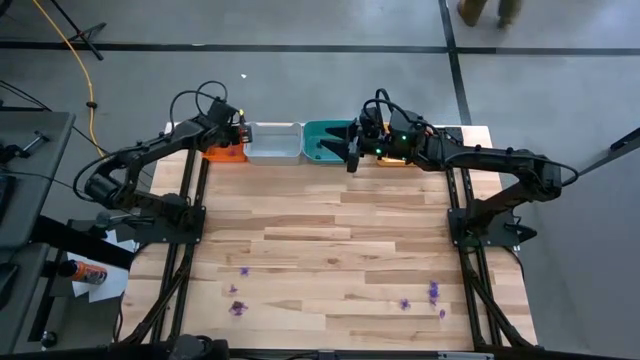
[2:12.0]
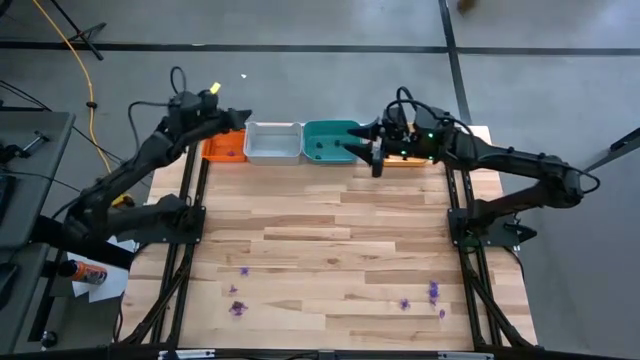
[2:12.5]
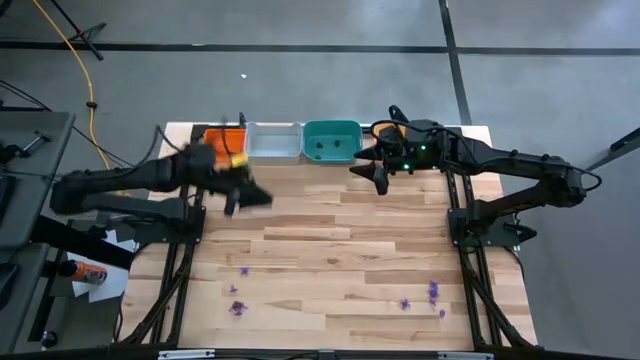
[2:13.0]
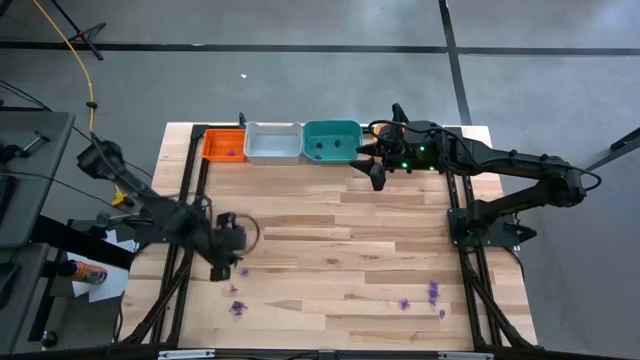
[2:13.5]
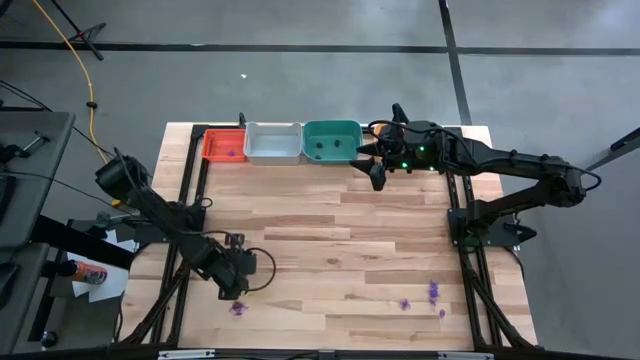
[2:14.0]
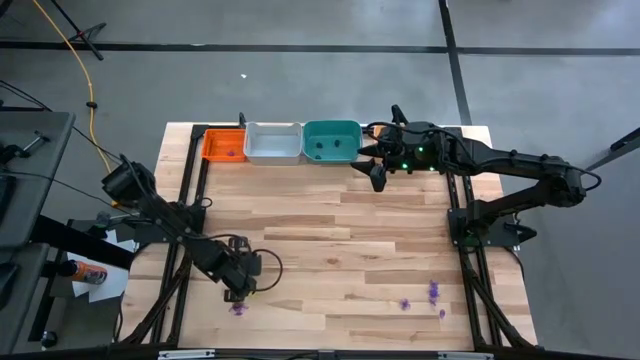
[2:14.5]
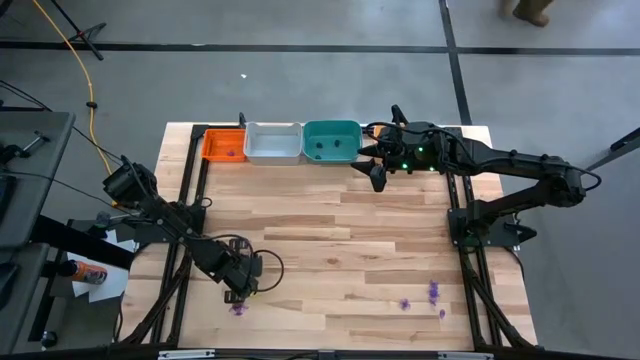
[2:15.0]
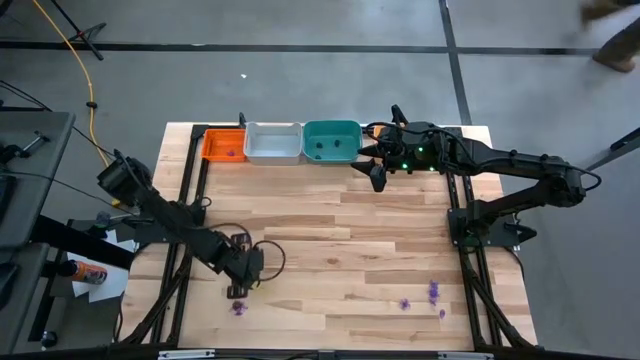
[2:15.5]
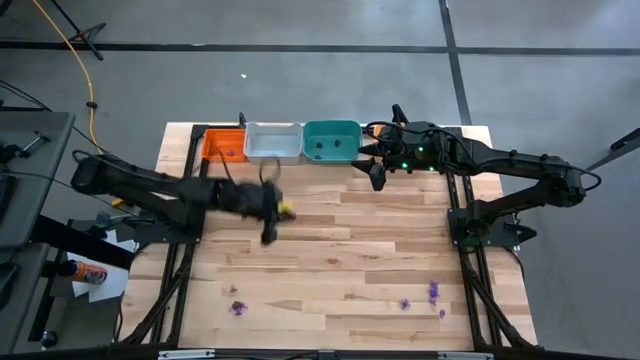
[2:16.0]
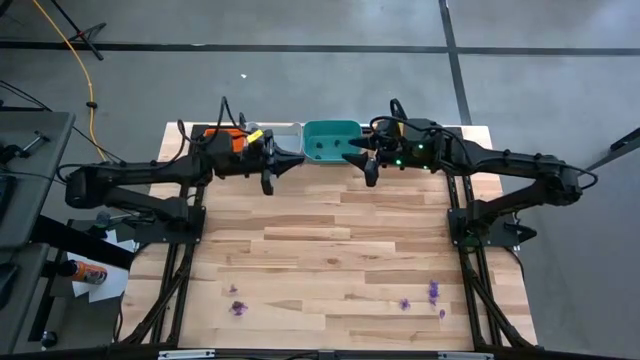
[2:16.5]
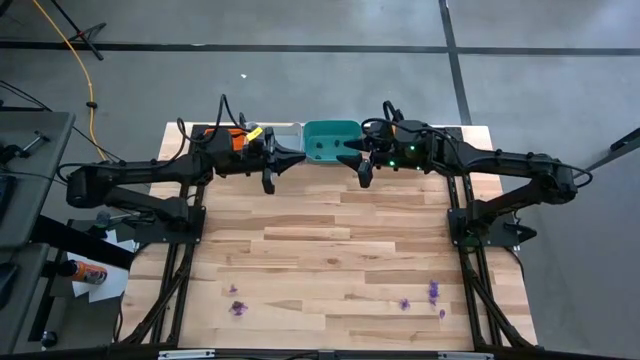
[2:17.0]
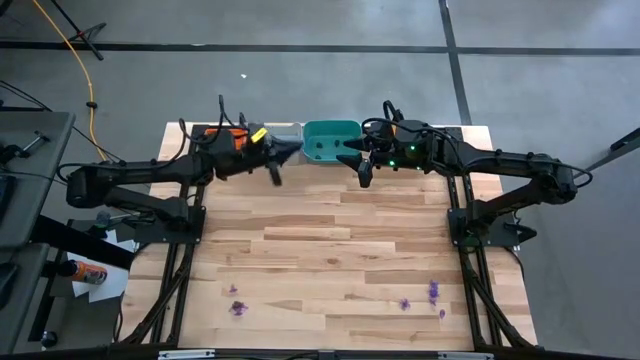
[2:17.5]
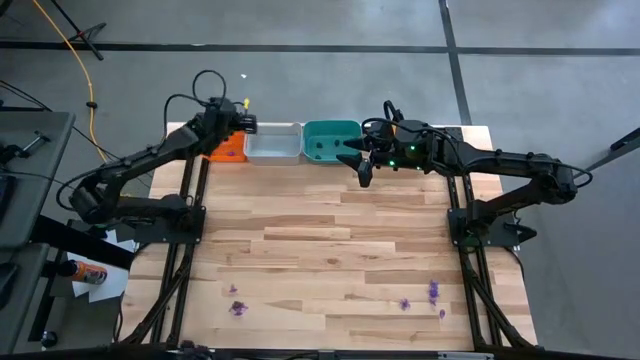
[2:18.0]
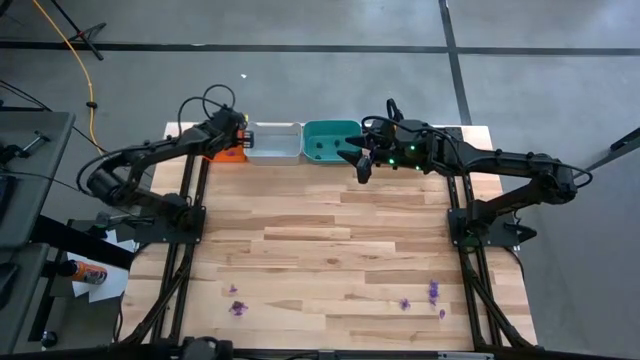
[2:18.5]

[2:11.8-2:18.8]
Task: Sort Halloween decoration
Put the violet spider into the orange bin

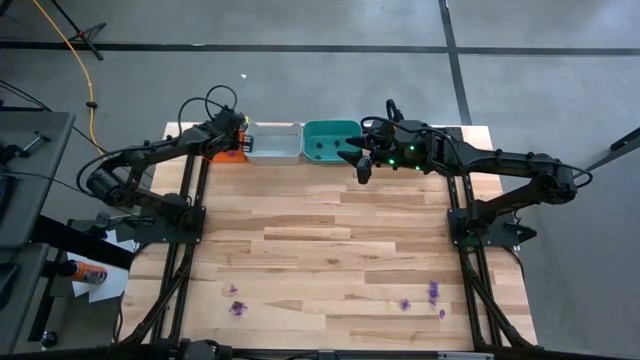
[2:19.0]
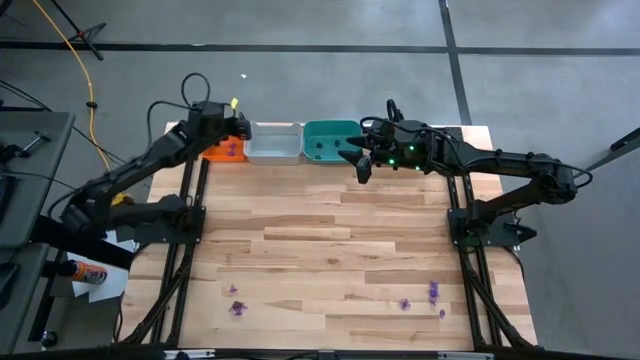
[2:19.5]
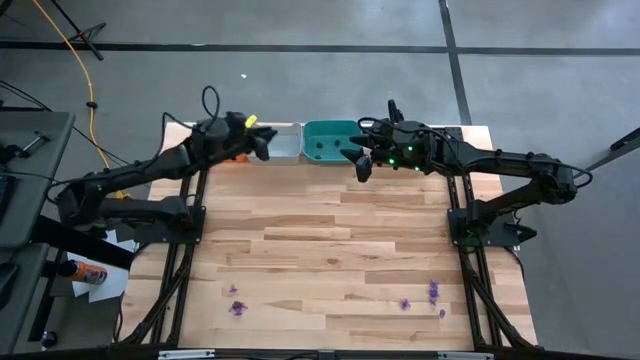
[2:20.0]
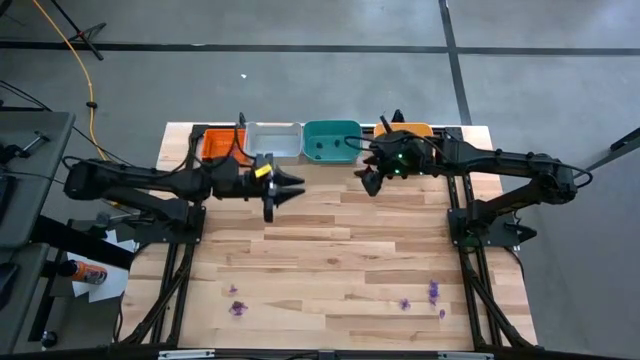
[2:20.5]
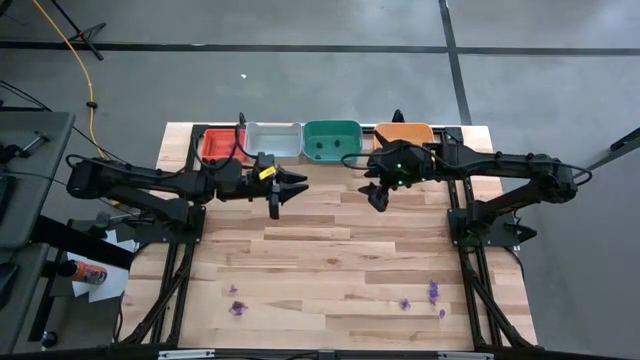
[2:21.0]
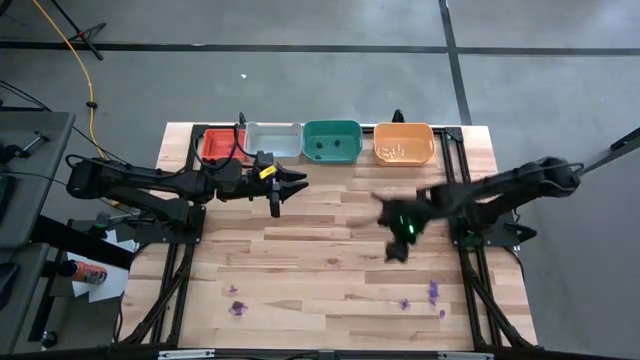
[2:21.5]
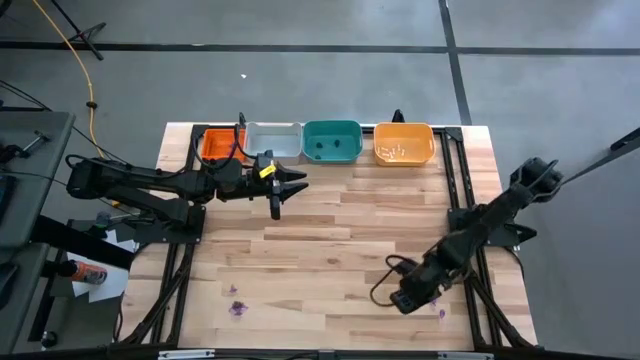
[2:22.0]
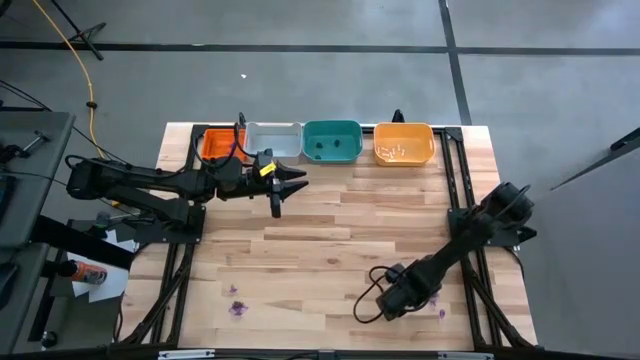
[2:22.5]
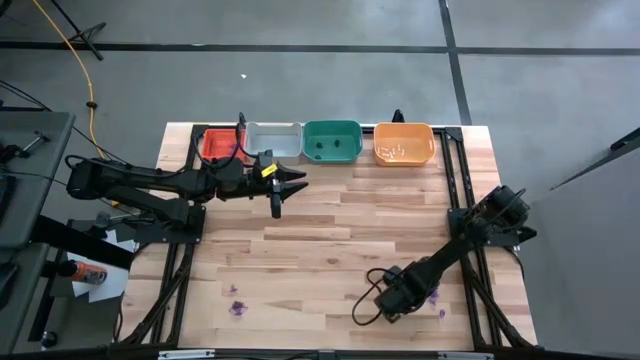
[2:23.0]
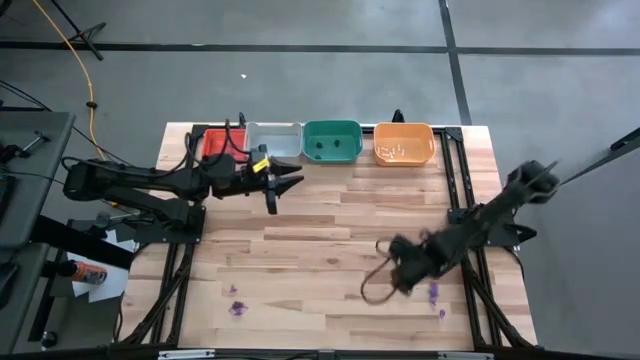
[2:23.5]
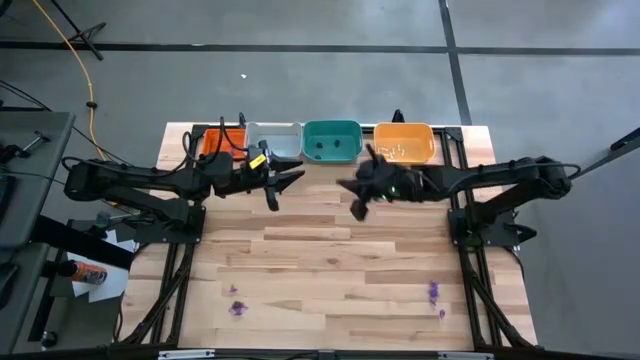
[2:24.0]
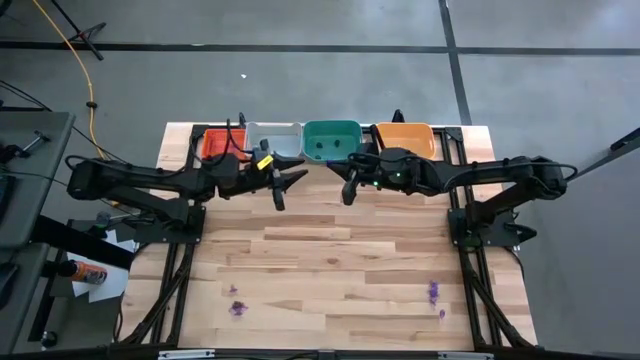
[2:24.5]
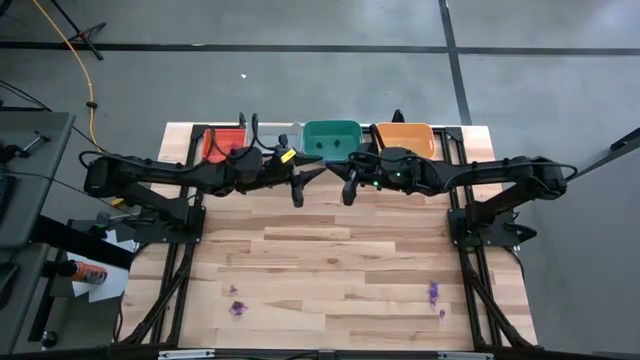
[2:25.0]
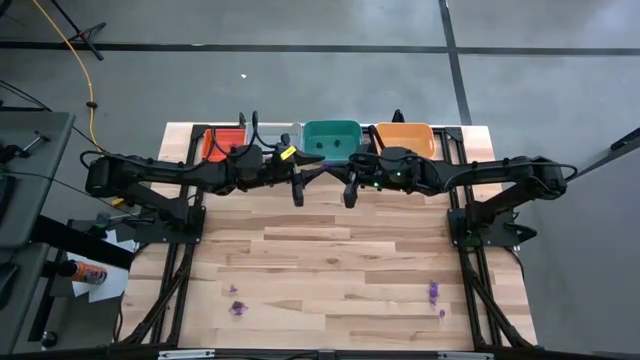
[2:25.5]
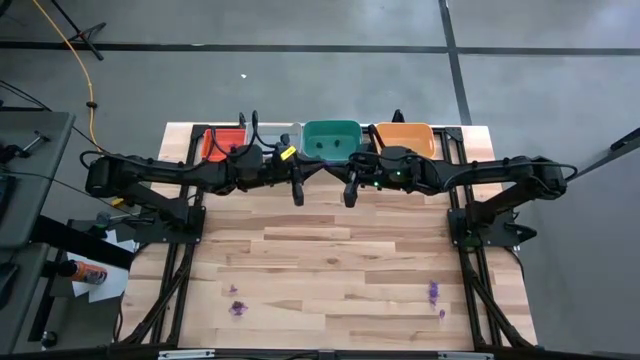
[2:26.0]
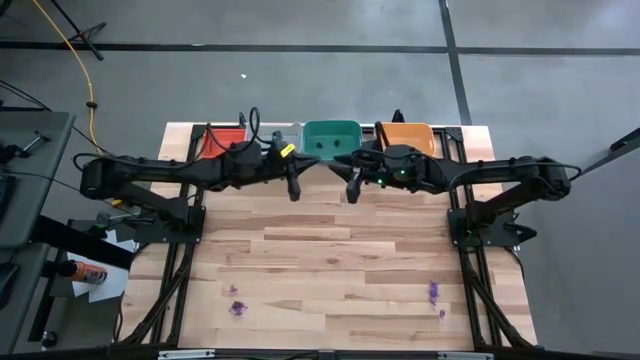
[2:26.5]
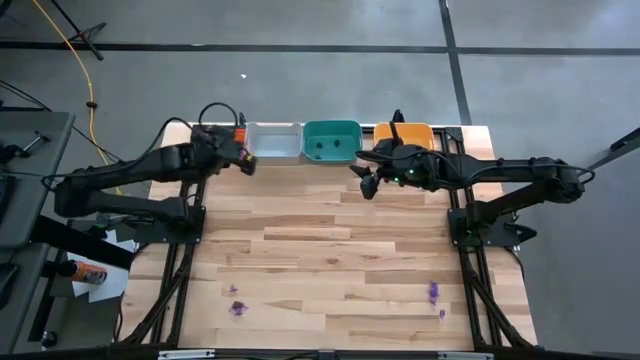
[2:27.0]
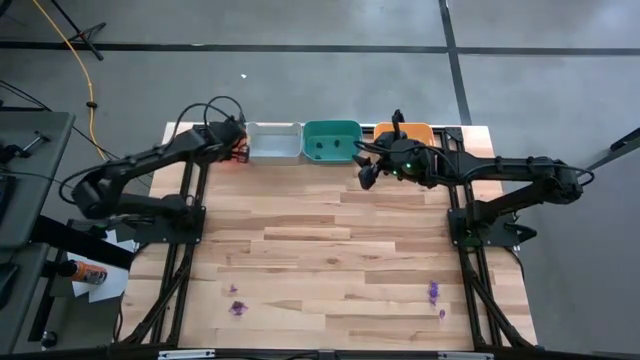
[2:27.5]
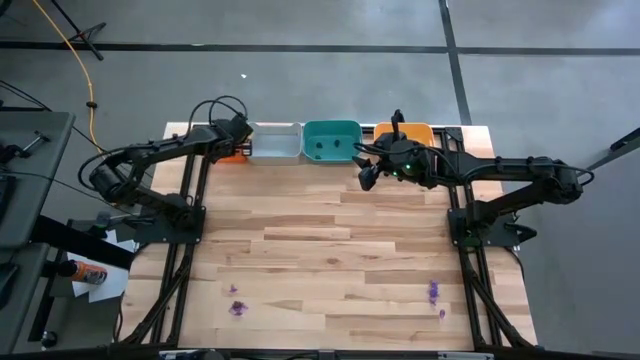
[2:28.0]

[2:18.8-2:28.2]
Put the violet spider into the orange bin

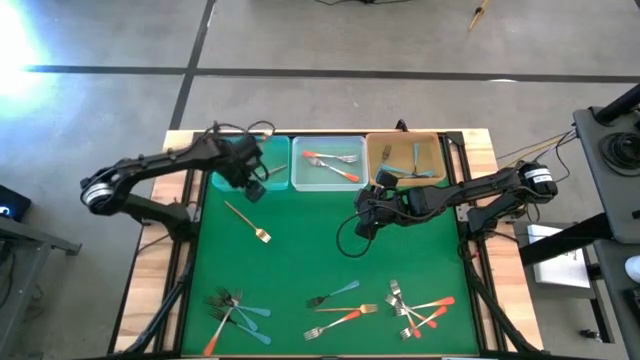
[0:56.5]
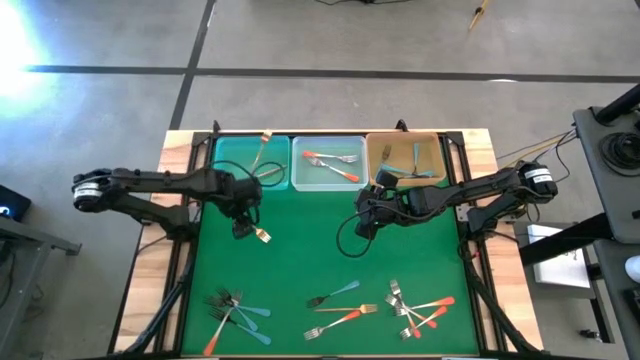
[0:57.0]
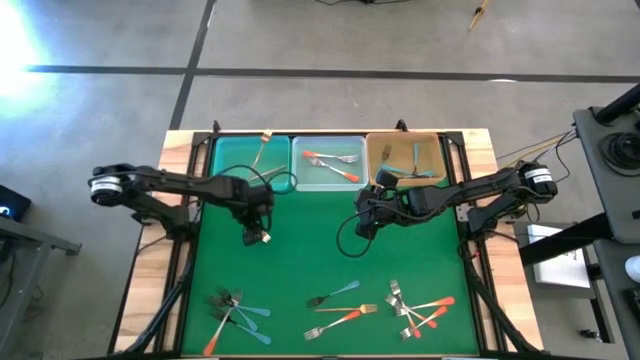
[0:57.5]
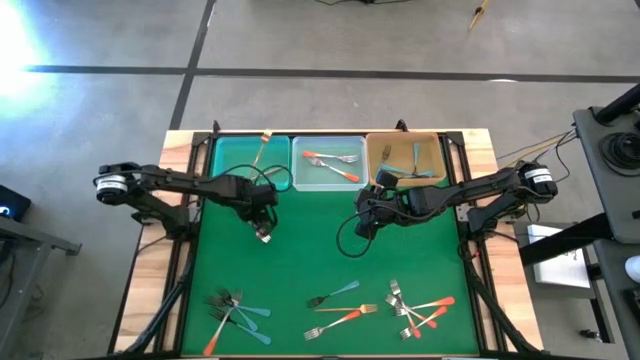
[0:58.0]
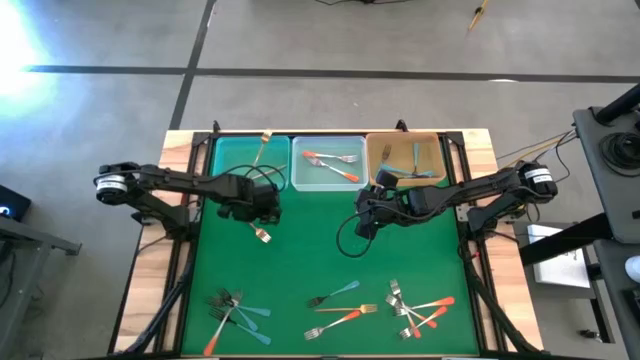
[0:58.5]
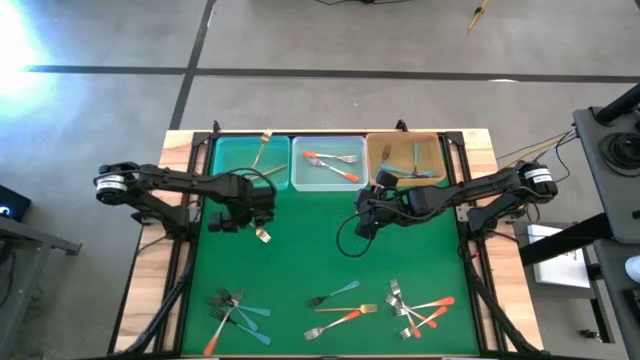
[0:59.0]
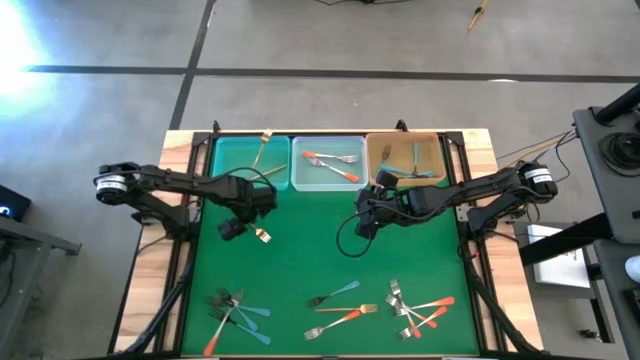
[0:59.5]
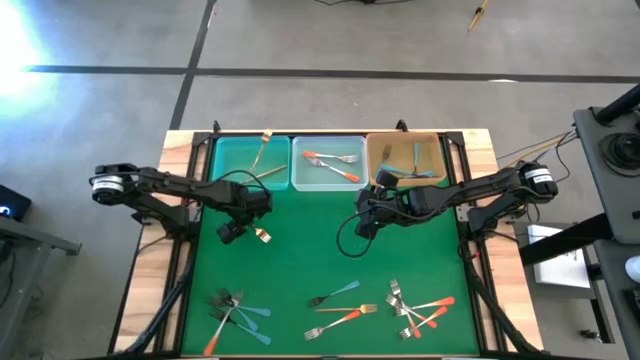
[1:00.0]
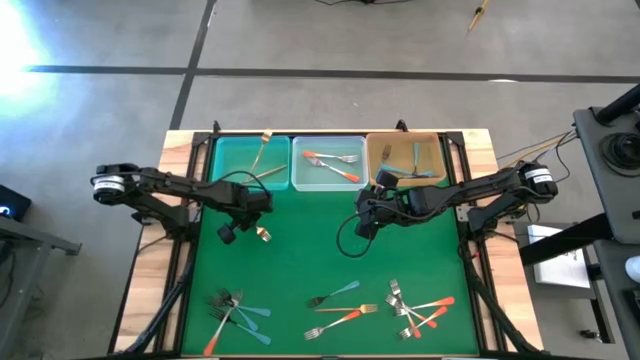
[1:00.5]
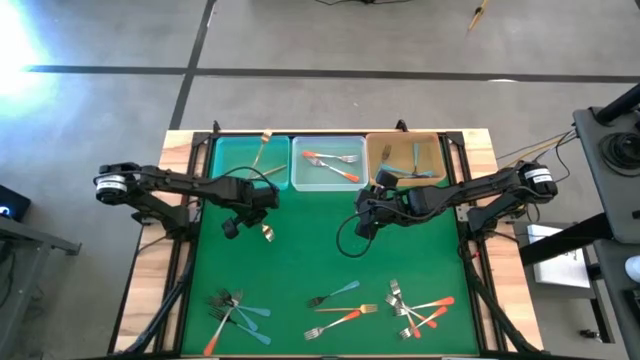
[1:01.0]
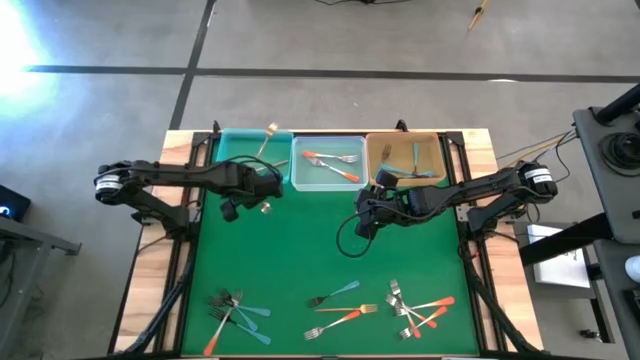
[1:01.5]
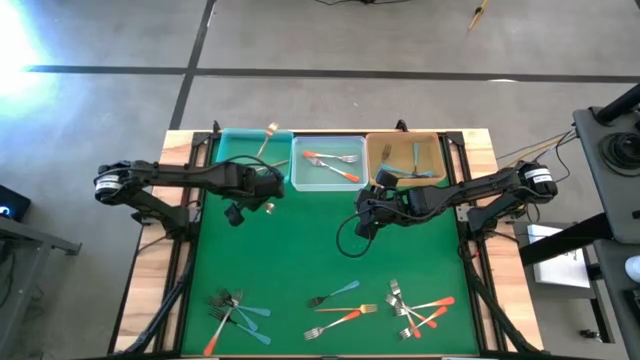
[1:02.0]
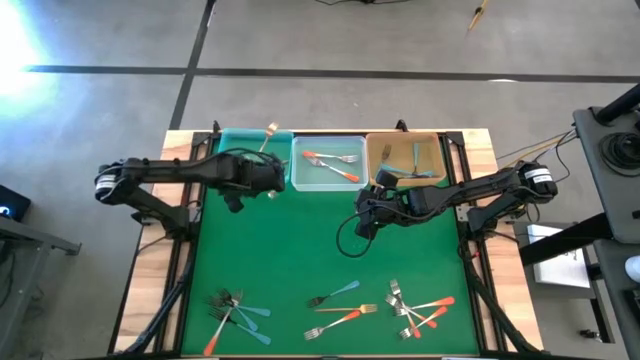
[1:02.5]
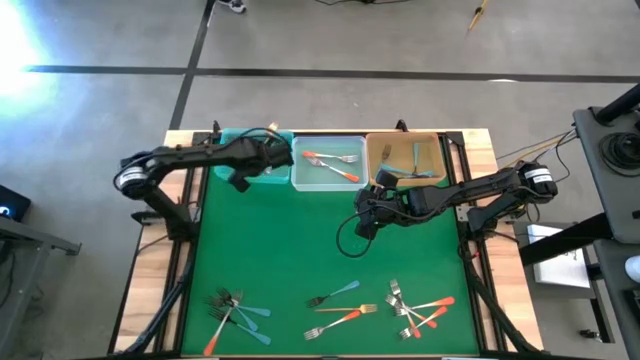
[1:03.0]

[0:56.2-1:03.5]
Task: Sort silverware by color (type)
Put the gold fork into the blue bin
